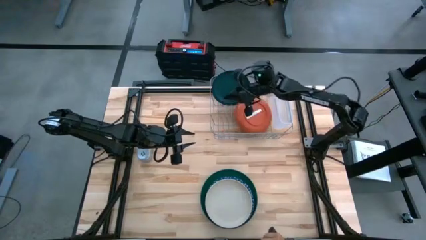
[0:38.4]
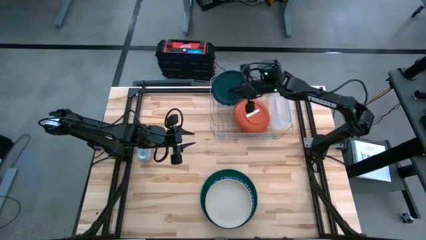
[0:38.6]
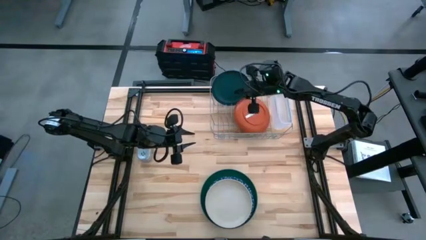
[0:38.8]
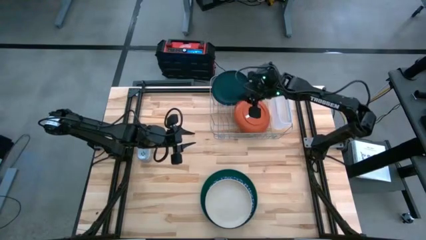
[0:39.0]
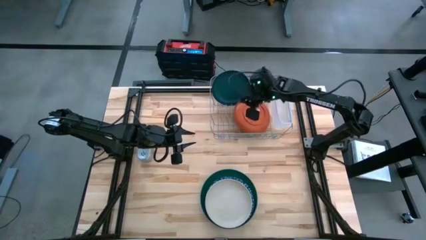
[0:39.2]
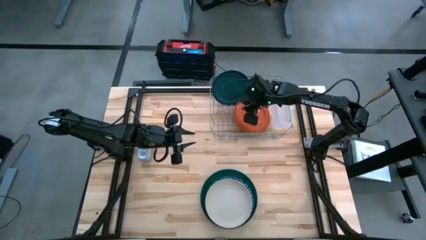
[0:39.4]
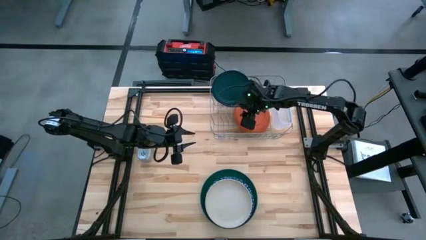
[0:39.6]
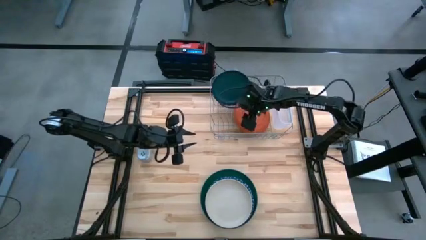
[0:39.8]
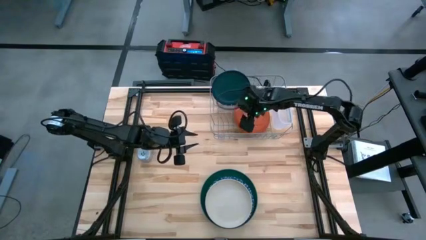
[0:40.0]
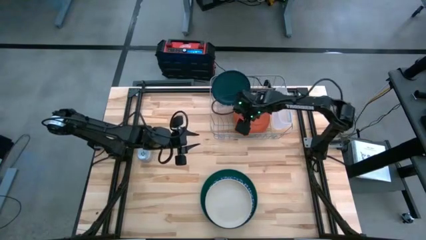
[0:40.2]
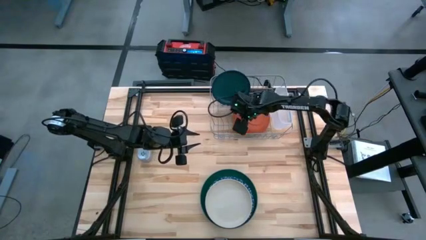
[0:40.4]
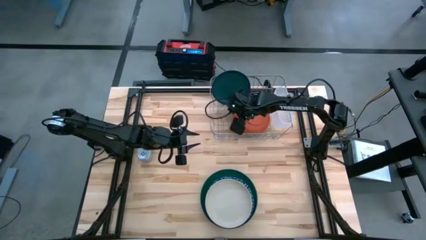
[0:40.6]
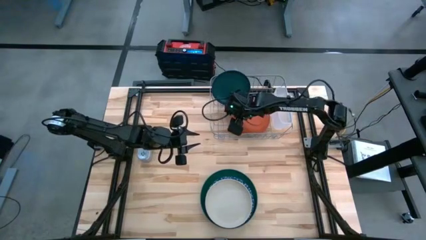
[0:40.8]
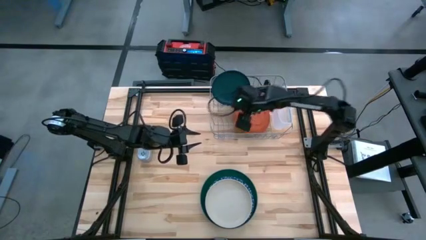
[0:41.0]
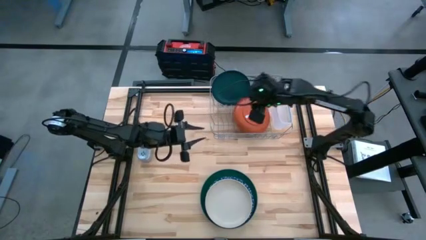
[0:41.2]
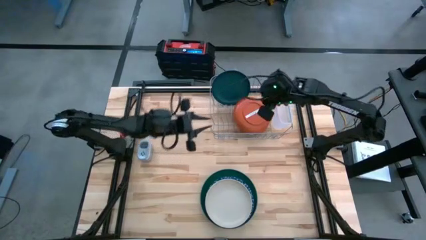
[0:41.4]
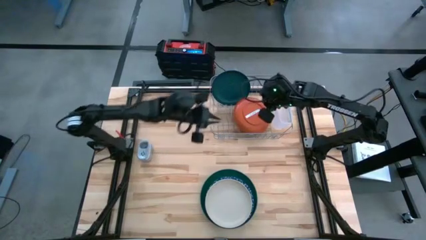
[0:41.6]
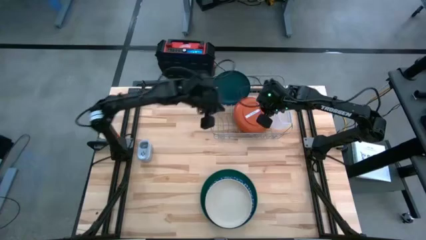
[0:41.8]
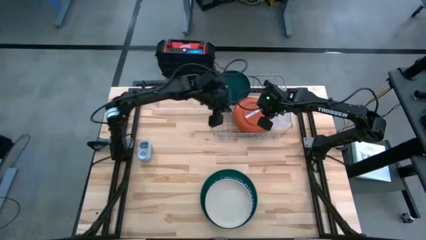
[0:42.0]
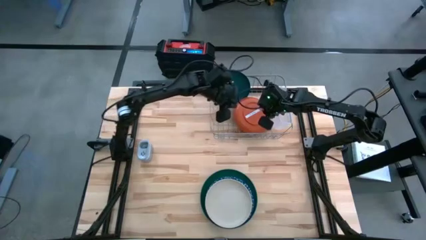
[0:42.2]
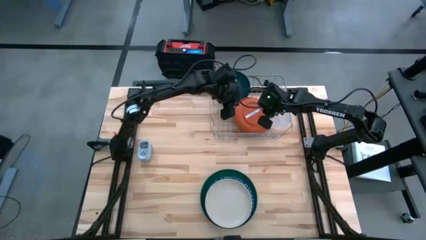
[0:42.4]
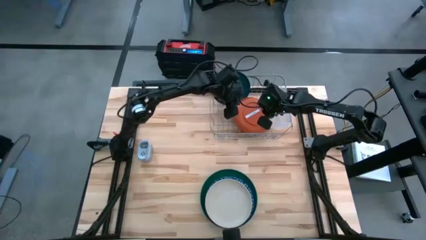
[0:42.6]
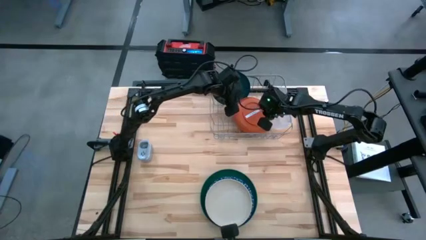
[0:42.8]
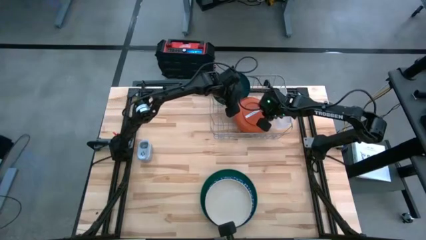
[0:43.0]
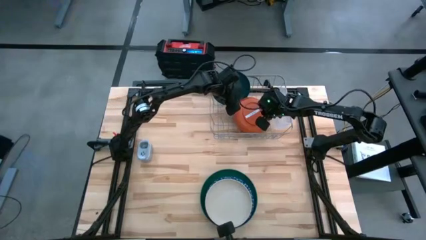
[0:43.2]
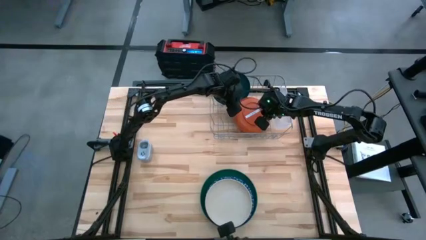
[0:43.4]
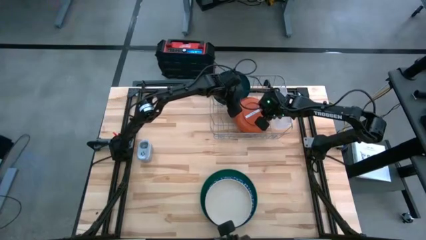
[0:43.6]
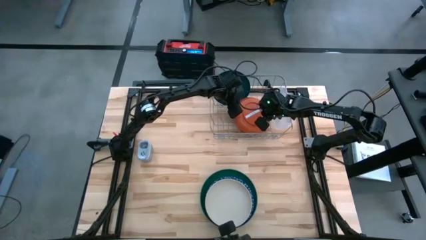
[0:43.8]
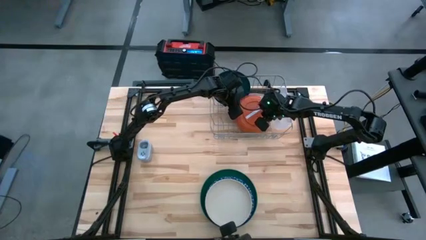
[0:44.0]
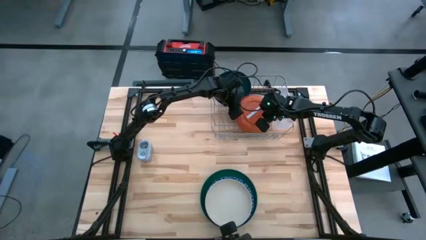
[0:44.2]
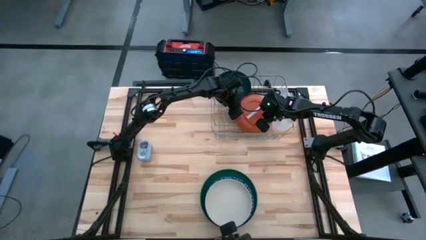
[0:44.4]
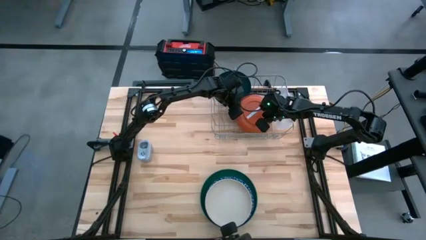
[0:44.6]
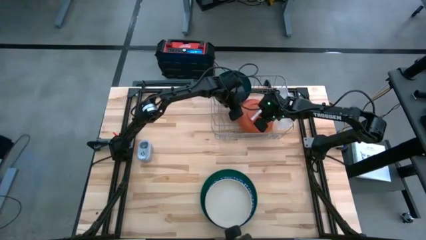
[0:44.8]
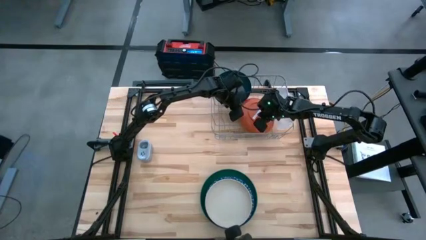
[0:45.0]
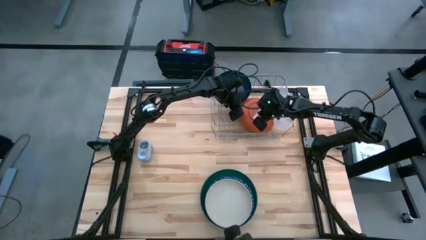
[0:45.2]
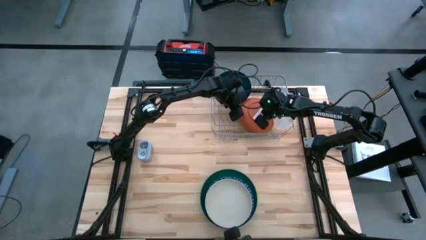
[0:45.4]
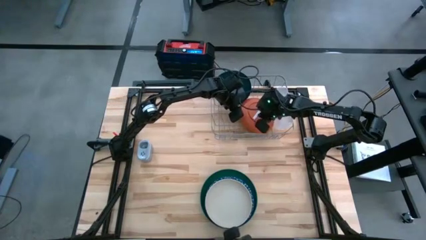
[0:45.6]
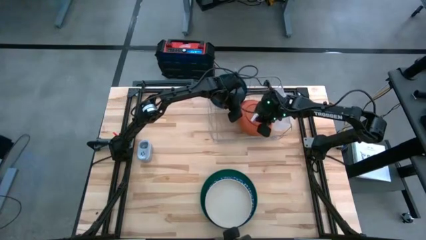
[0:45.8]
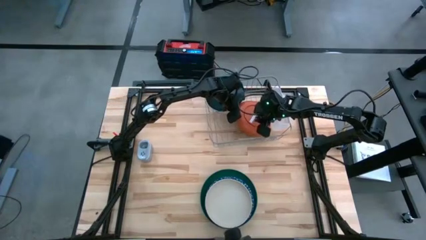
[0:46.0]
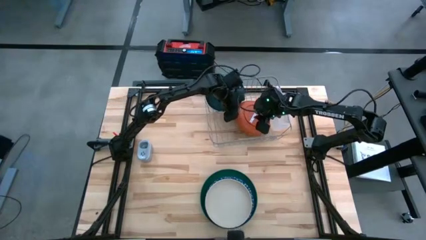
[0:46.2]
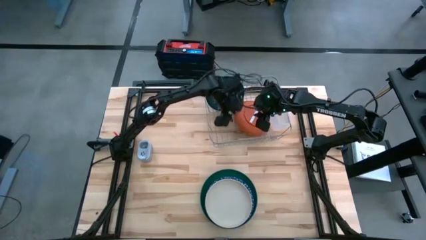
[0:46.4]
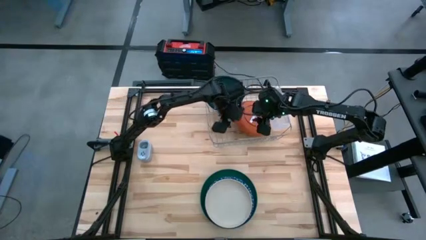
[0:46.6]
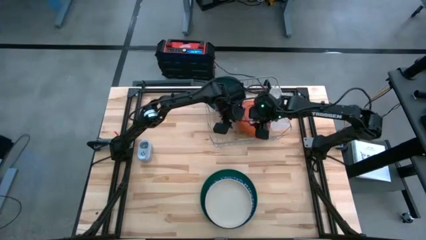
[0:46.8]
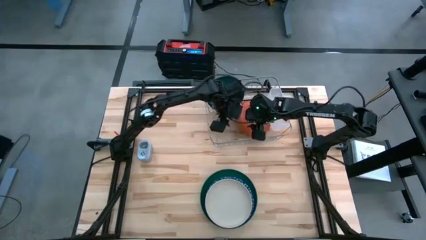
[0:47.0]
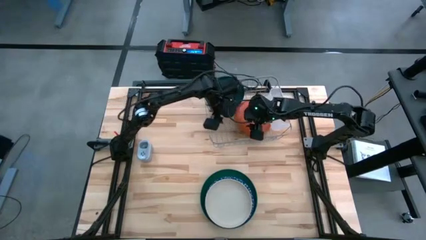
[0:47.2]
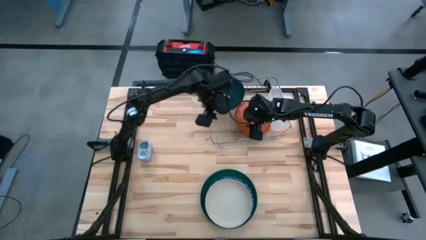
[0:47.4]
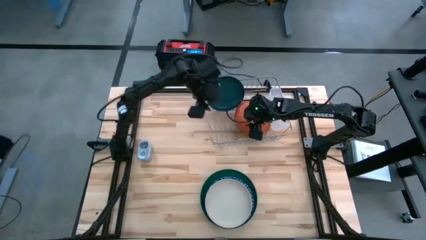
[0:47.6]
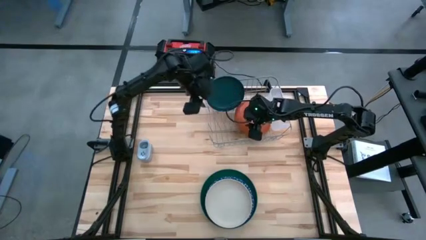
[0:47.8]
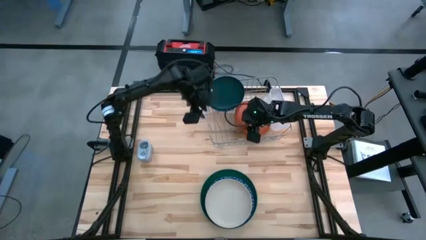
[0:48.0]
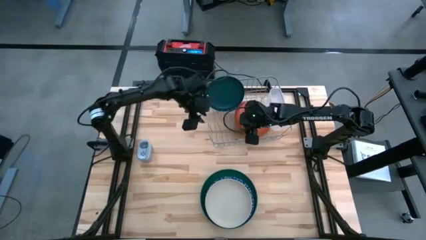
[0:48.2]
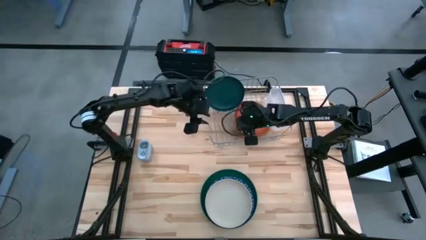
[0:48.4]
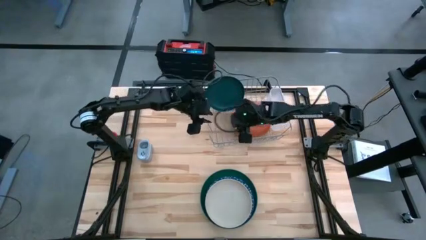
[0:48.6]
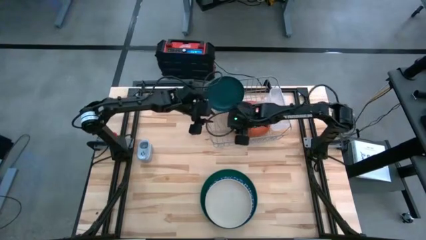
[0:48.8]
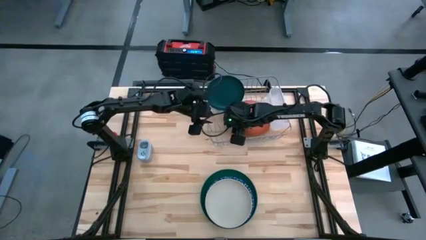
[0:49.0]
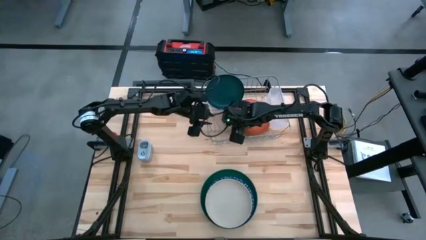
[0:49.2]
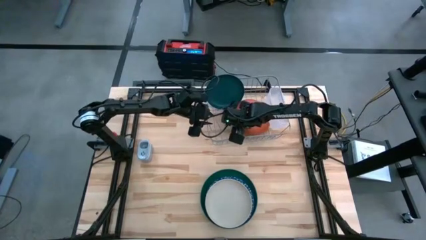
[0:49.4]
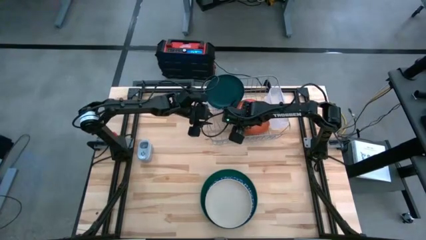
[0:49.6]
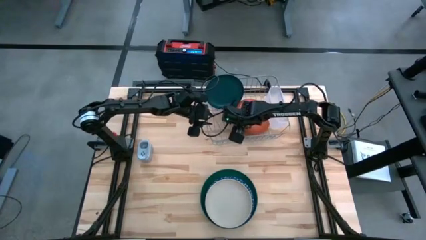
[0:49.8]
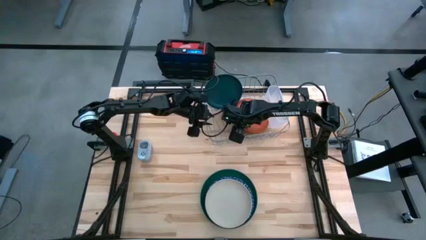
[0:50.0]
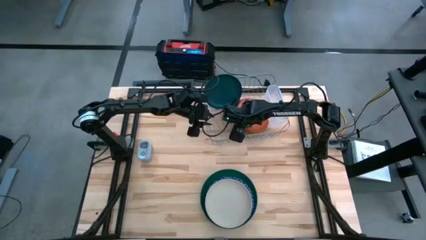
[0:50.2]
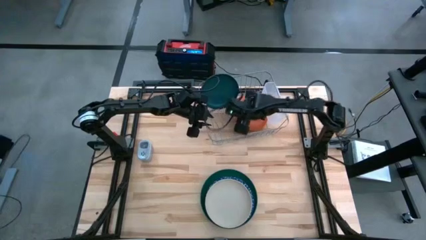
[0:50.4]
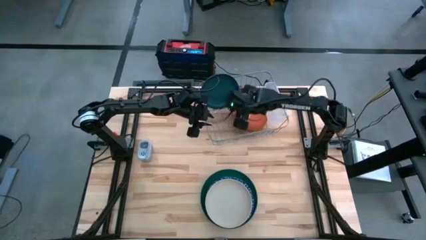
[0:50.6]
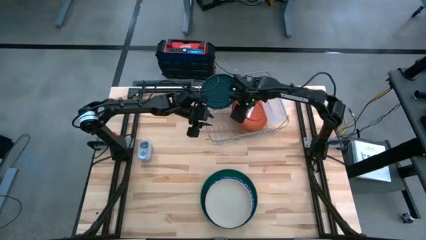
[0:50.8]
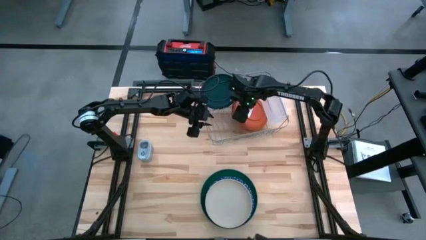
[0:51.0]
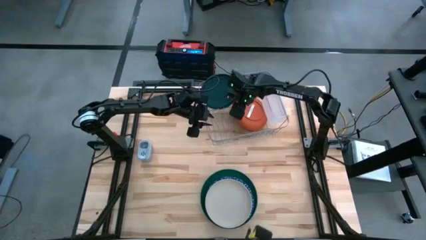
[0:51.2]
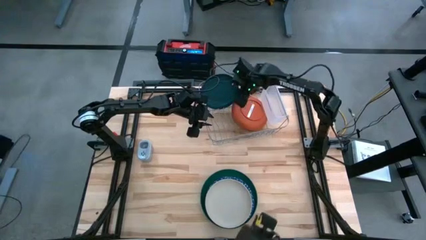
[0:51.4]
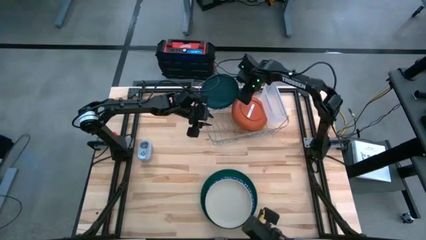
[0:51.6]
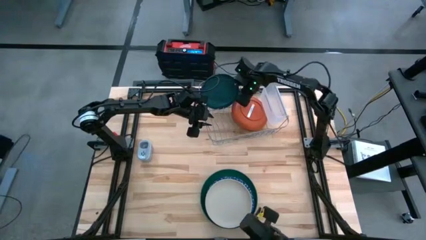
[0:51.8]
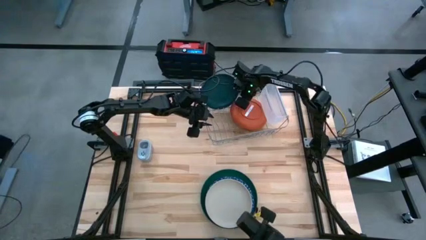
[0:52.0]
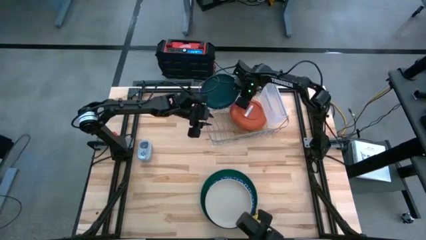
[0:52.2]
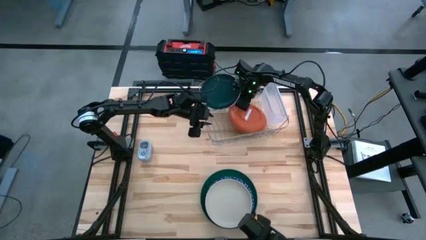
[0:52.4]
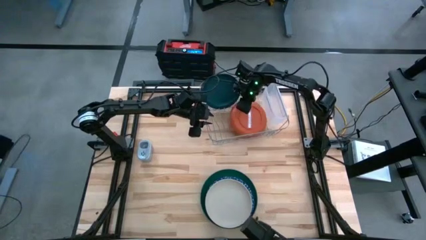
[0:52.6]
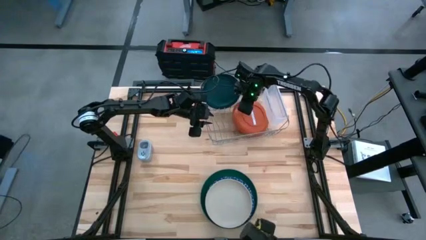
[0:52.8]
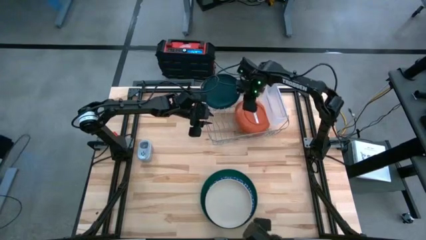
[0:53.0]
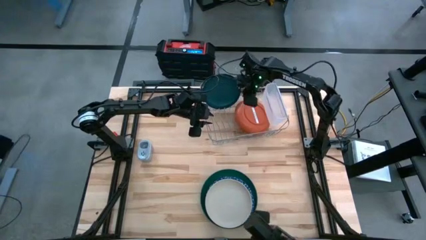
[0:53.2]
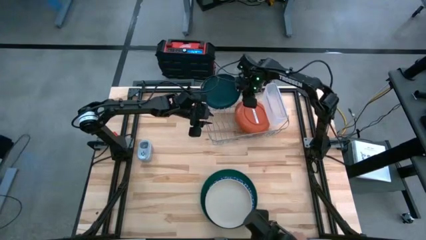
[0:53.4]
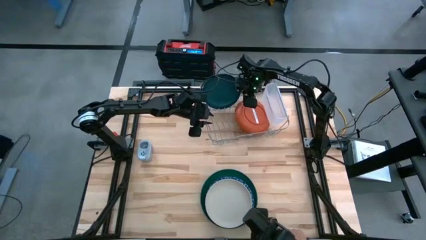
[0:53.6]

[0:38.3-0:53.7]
Task: Sort dishes
Put the orange plate in the dish rack

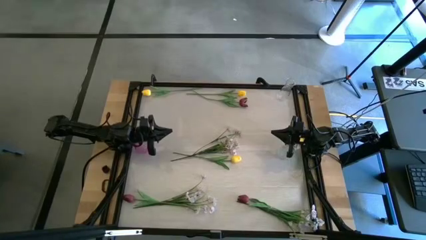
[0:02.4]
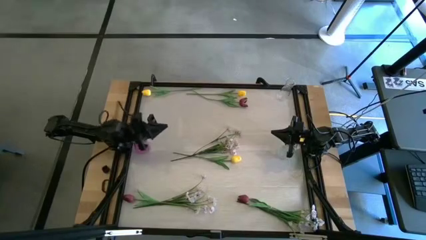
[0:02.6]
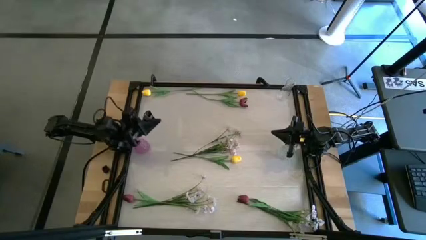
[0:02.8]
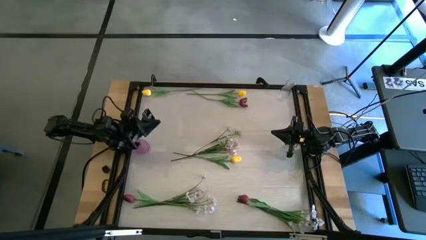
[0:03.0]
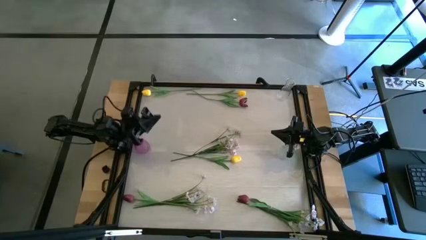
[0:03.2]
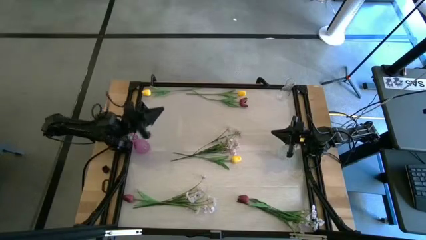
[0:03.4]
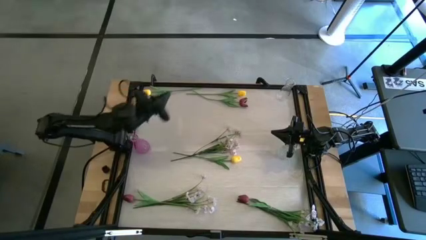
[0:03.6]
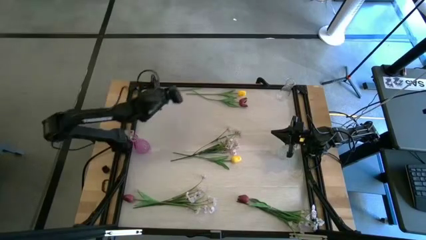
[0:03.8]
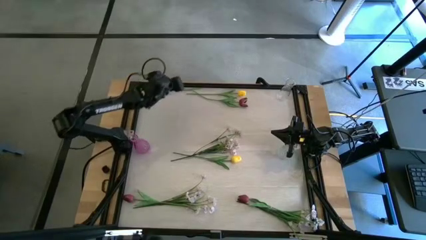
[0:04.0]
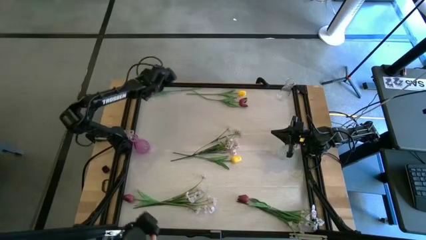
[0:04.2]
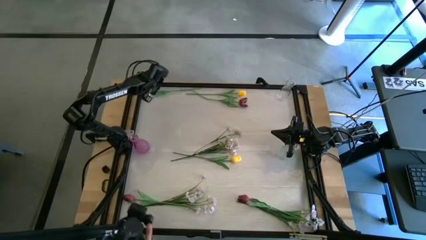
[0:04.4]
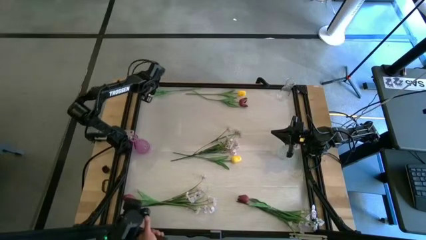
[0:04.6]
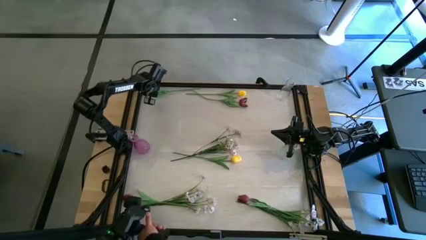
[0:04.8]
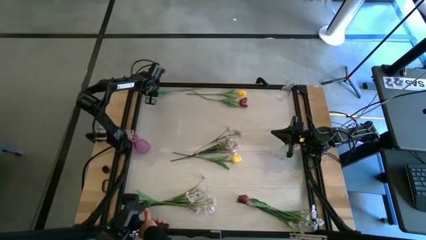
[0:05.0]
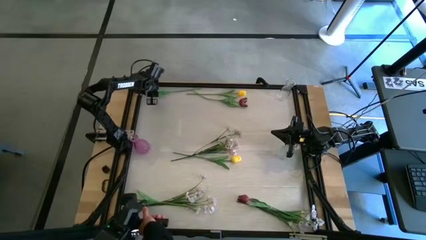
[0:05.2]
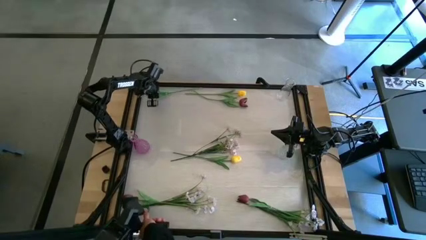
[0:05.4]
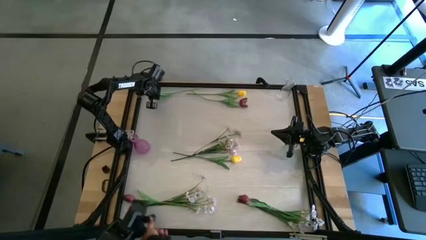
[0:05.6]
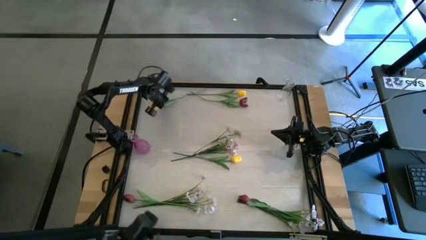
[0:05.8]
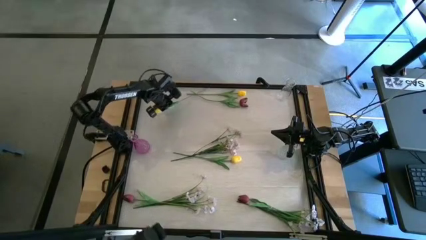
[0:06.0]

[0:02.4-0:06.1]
Task: Sort flowers into vase by color
Put the top left yellow flower into the top transparent vase
